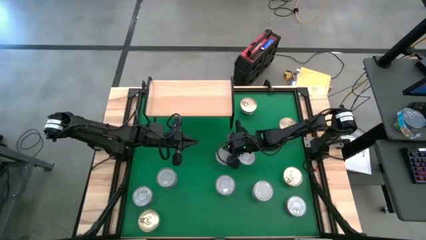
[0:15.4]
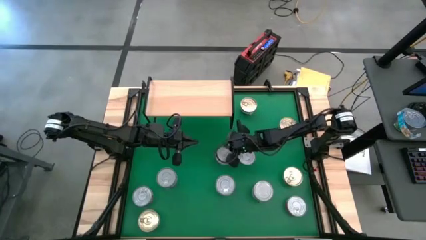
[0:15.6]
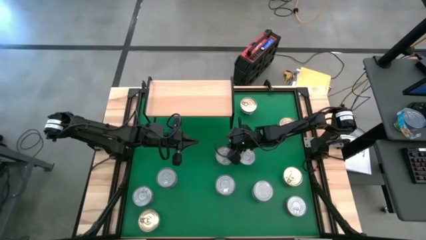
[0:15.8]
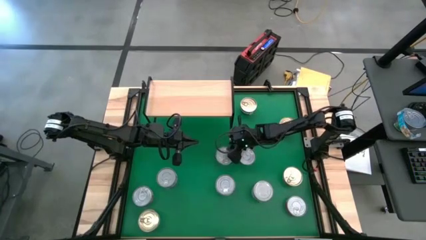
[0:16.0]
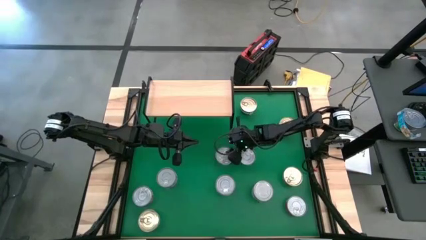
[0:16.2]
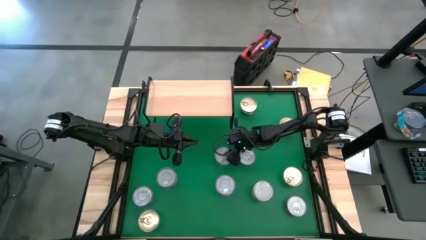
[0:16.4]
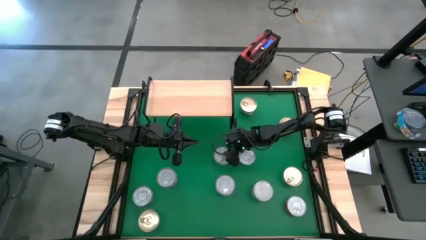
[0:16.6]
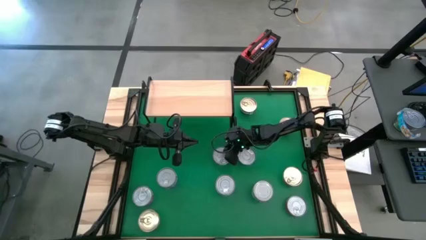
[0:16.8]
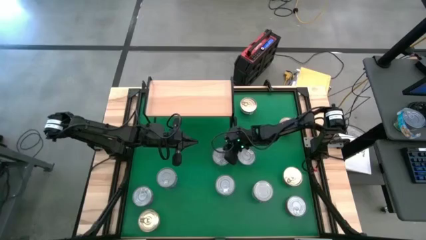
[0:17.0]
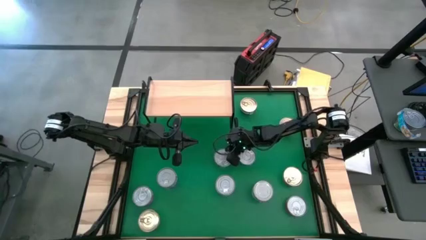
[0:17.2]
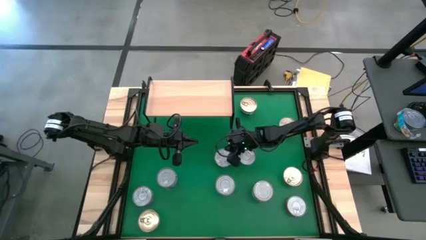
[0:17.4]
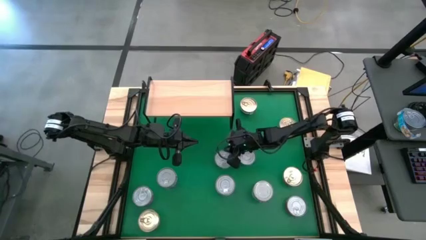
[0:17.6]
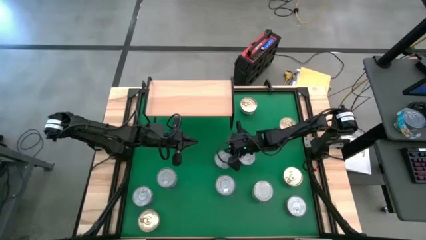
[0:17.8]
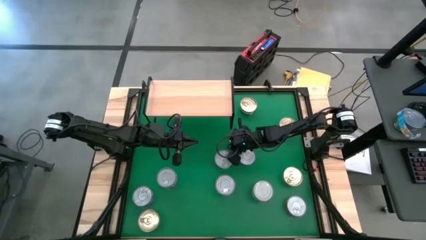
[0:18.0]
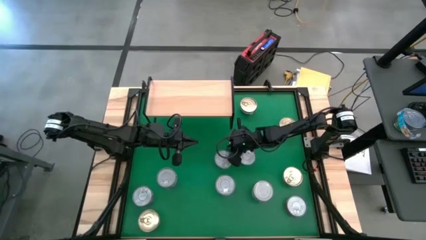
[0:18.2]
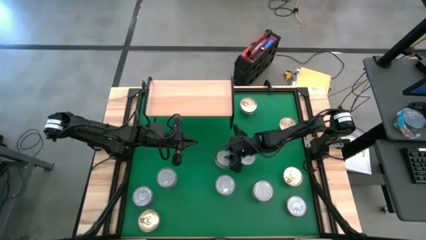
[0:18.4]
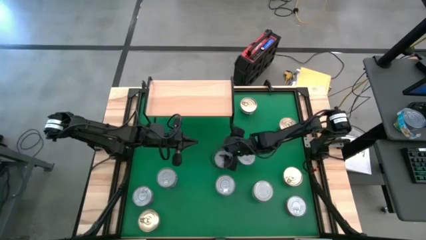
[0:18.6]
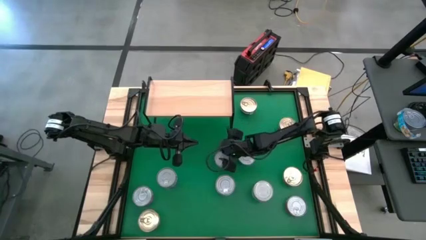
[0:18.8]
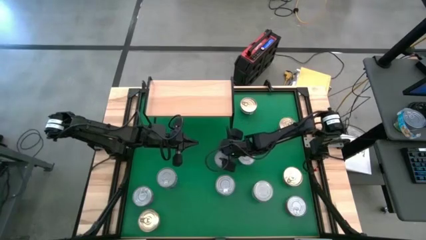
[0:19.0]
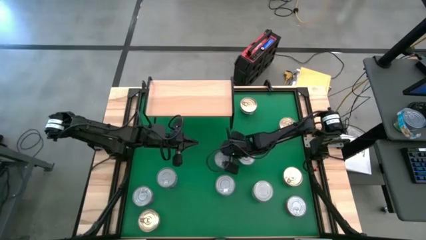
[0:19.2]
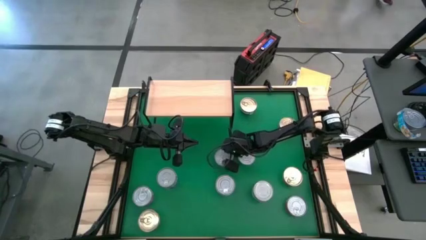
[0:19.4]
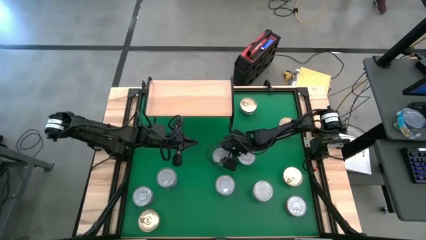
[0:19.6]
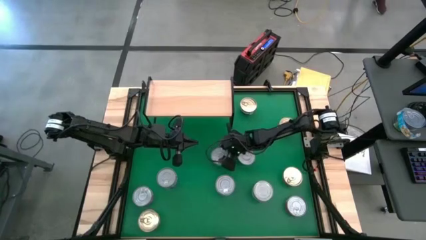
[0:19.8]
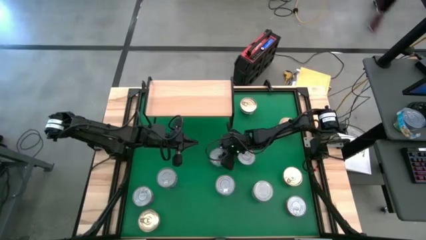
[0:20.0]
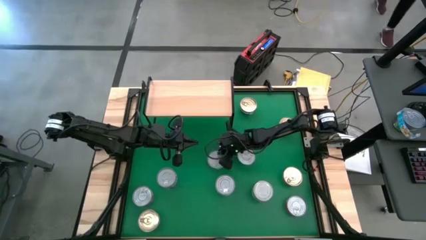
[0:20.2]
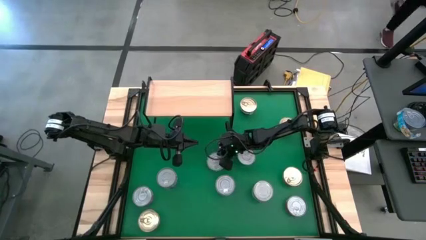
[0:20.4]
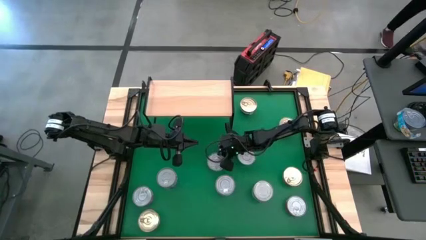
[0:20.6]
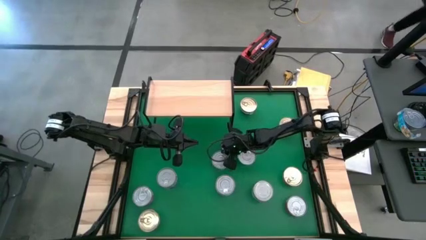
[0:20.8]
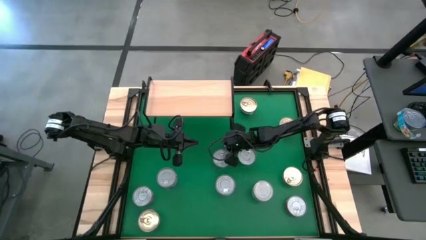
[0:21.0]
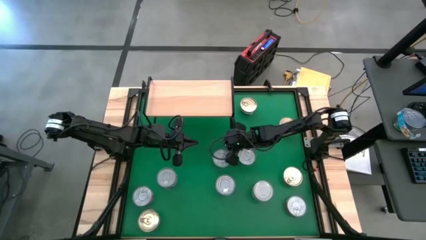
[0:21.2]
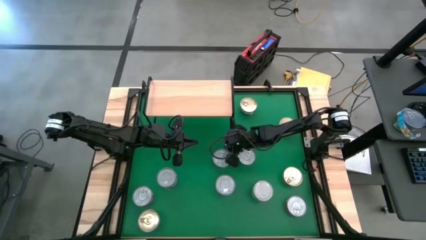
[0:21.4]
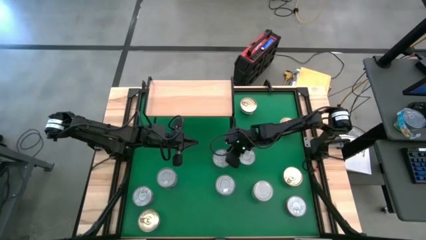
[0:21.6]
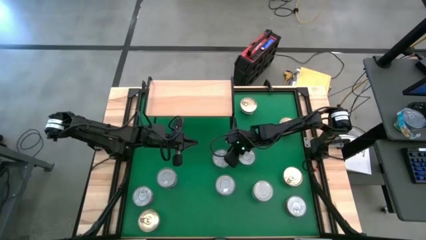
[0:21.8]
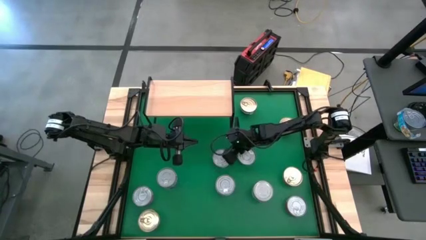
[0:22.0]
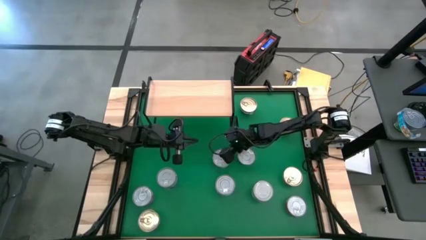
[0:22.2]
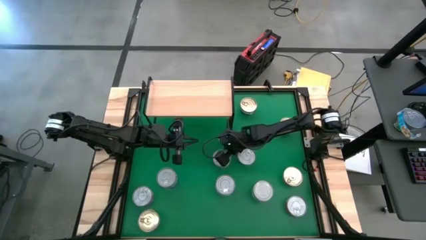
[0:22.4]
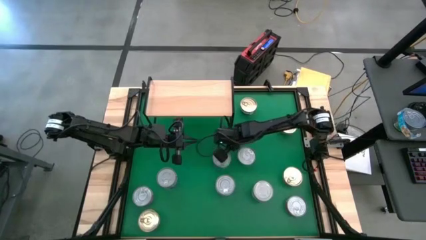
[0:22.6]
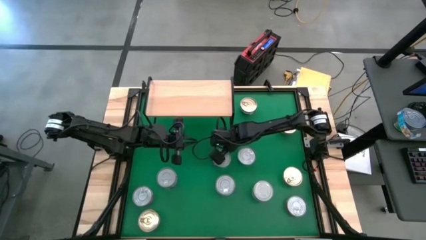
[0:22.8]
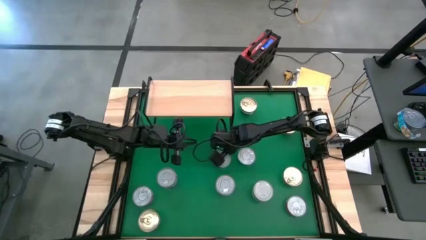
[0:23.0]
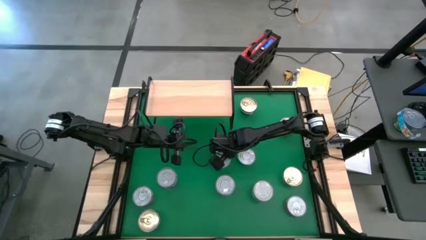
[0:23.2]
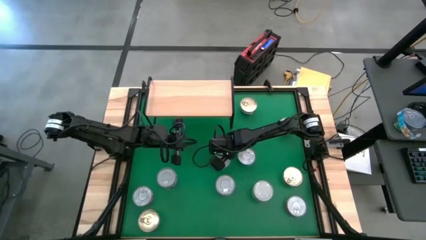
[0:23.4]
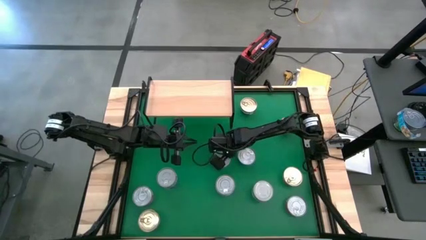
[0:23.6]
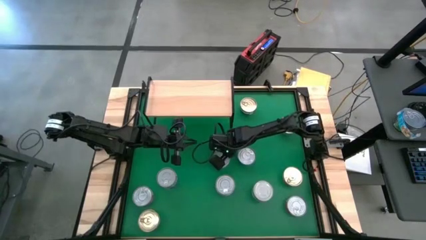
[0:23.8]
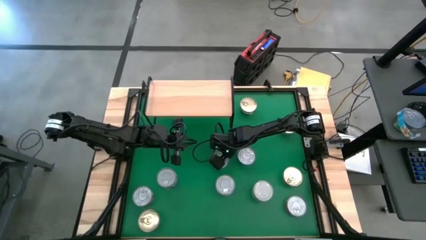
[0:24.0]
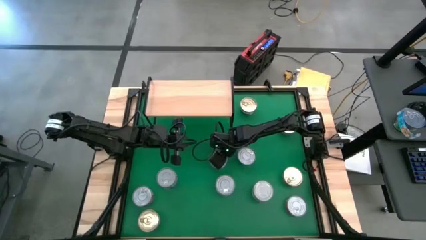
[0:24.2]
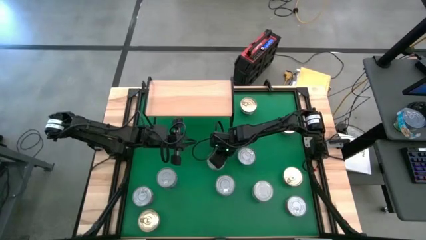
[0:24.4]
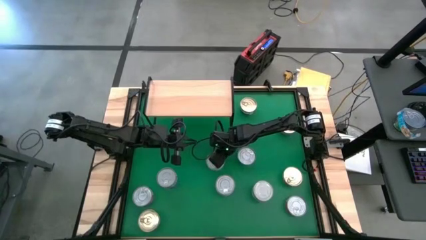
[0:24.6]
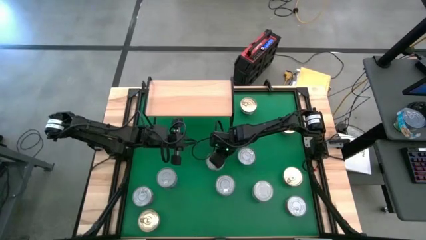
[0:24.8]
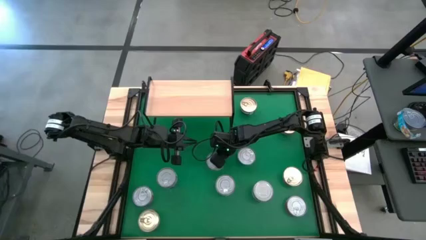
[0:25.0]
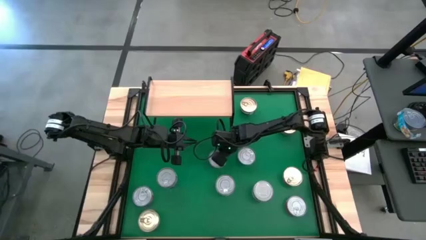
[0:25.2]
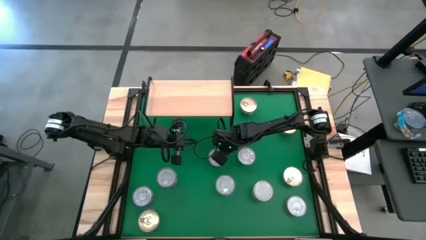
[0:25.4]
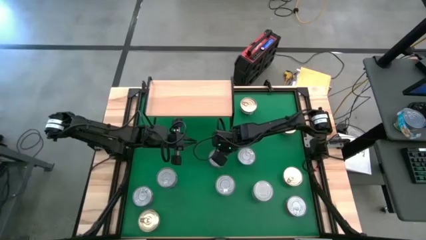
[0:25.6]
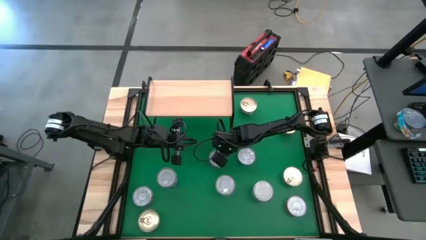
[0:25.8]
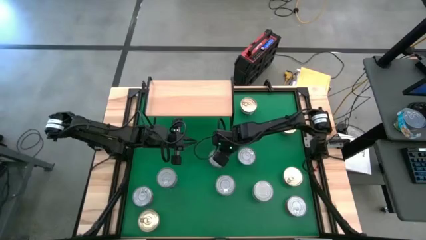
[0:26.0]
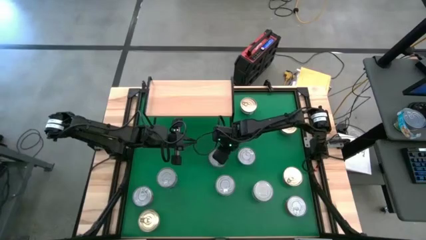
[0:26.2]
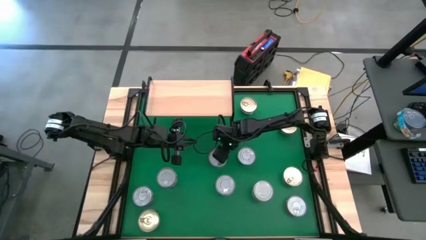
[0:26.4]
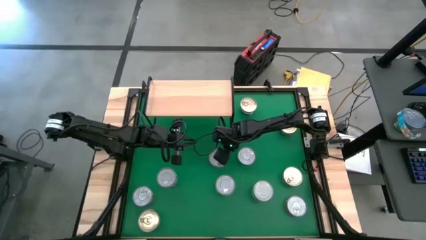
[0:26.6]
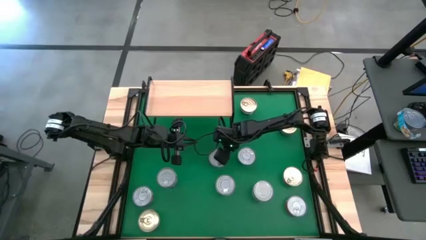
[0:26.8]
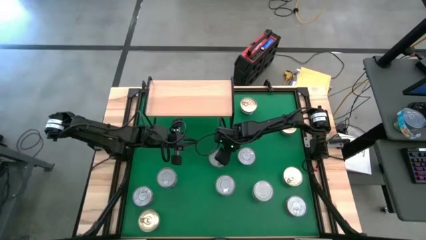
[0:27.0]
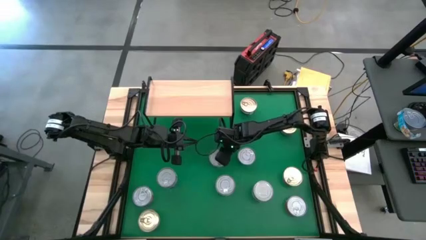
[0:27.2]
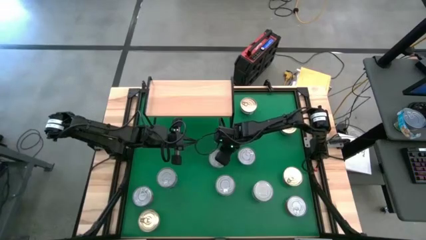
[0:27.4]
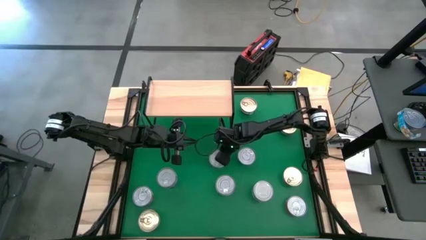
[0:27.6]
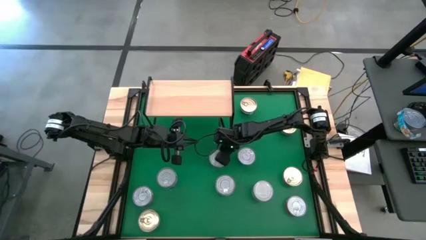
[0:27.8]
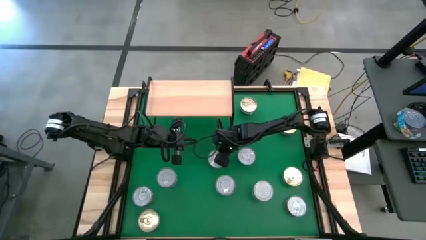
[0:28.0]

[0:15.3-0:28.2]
Task: Stack canned seafood by type on shelf
Put the top right blue tuna can on the shelf
